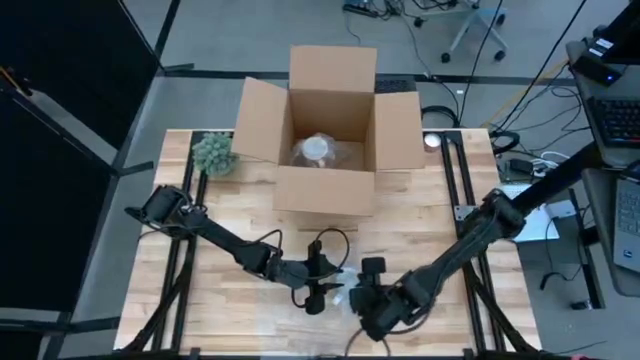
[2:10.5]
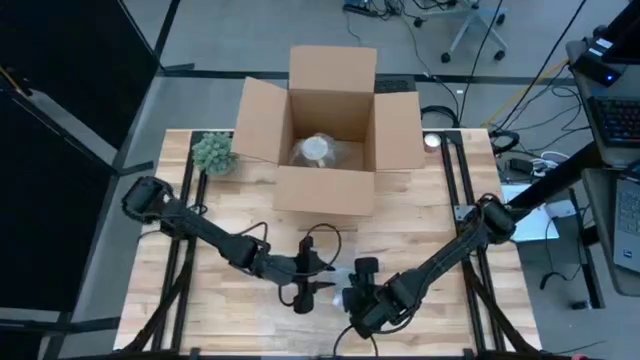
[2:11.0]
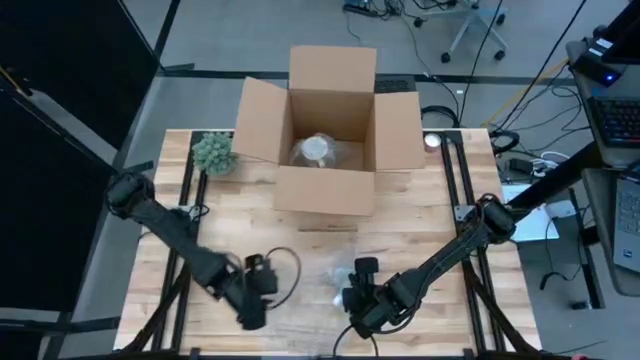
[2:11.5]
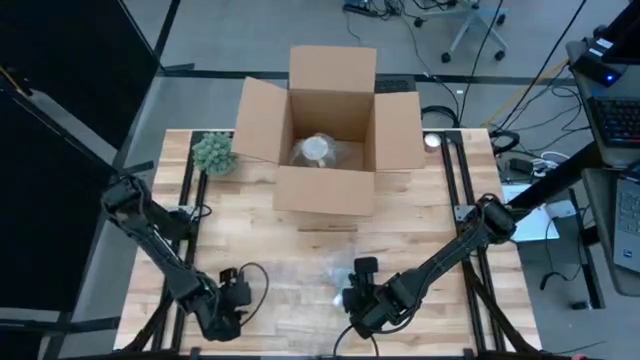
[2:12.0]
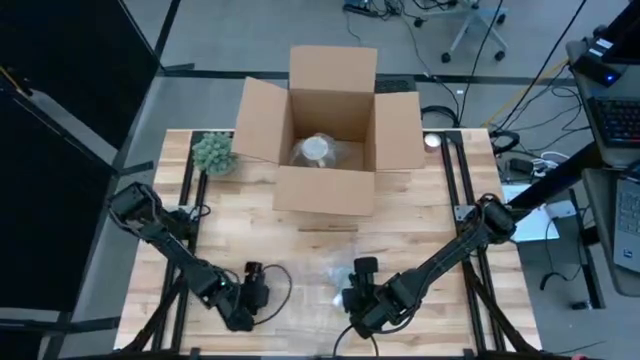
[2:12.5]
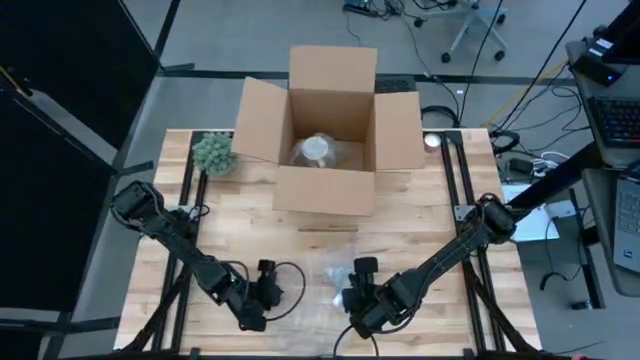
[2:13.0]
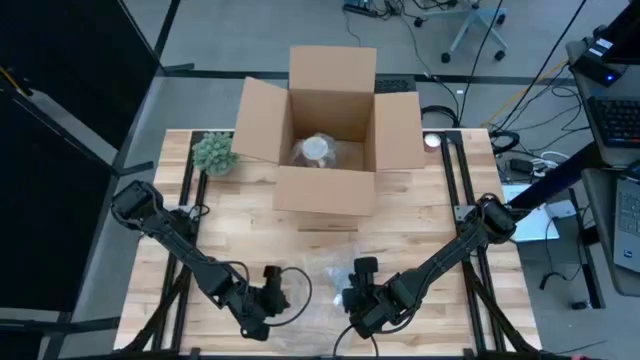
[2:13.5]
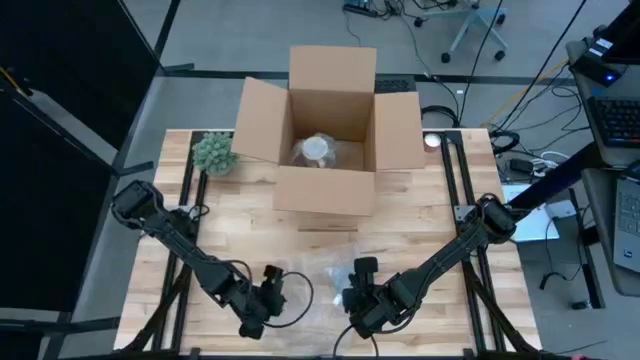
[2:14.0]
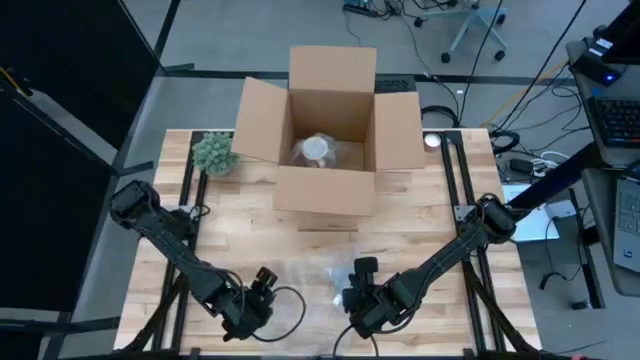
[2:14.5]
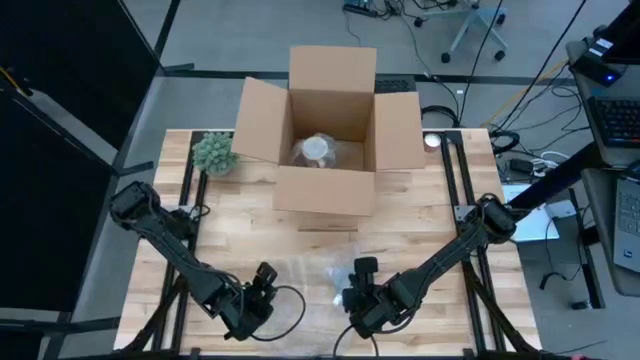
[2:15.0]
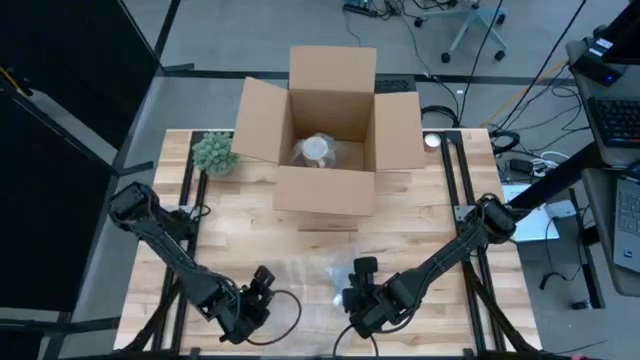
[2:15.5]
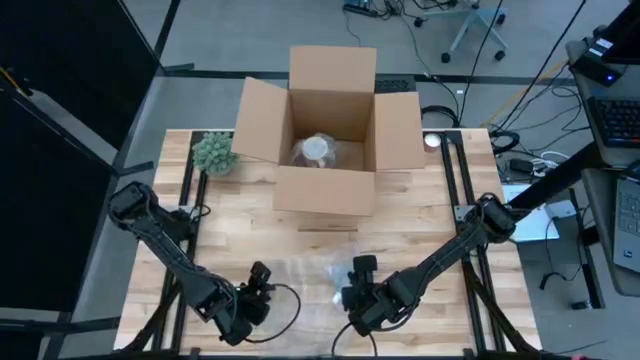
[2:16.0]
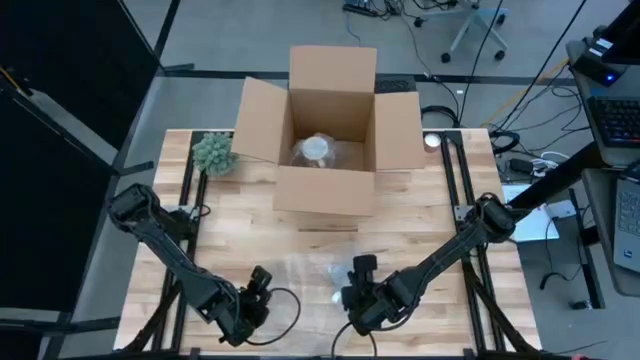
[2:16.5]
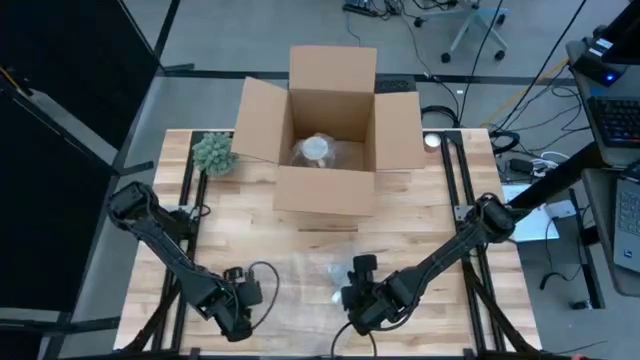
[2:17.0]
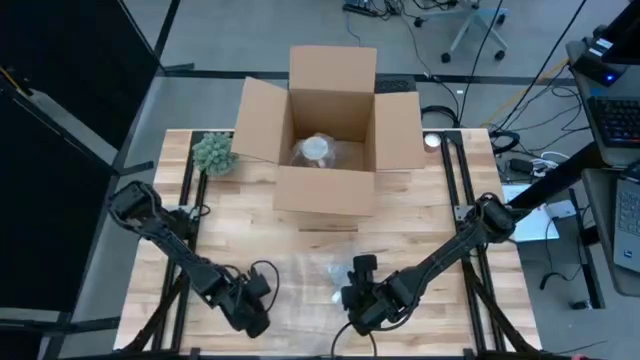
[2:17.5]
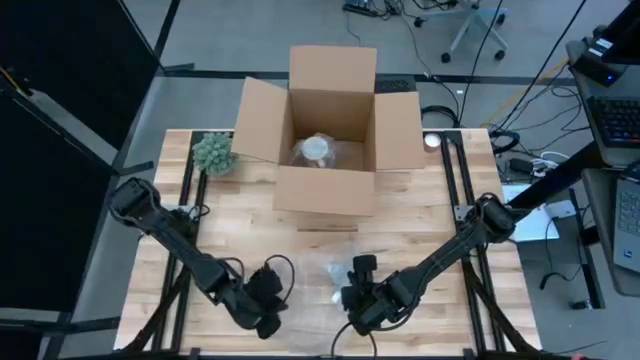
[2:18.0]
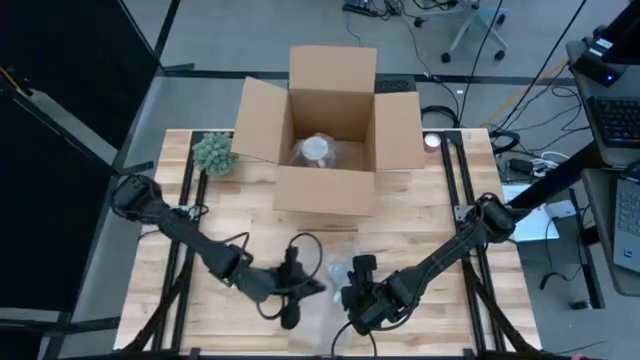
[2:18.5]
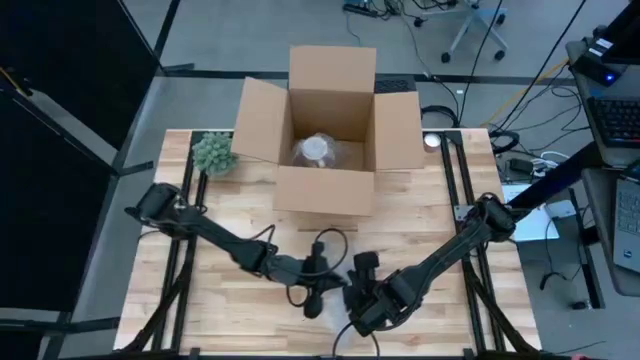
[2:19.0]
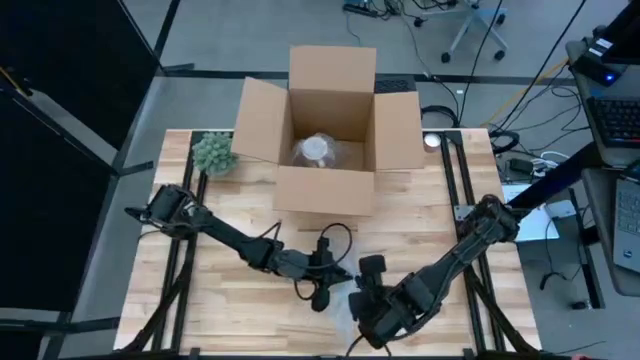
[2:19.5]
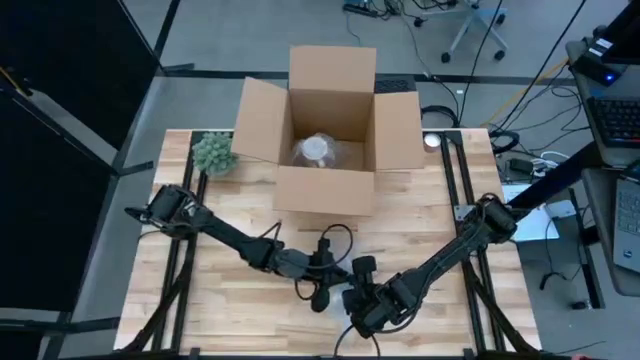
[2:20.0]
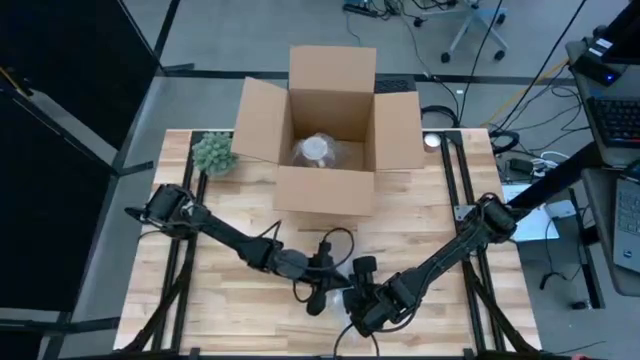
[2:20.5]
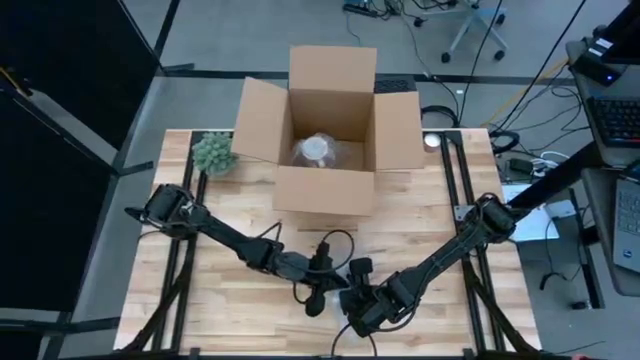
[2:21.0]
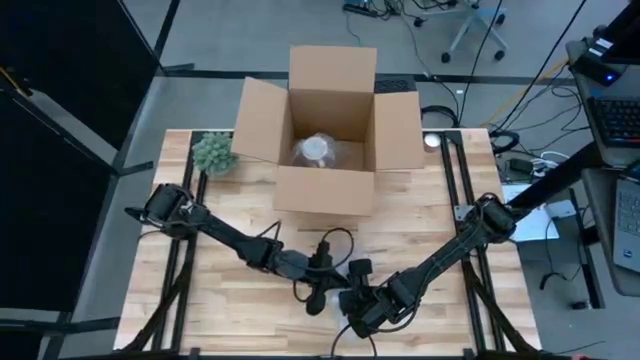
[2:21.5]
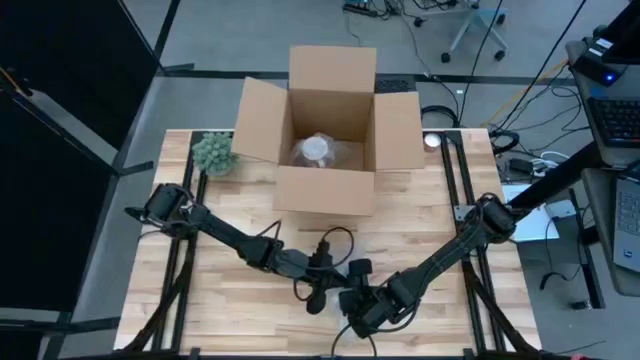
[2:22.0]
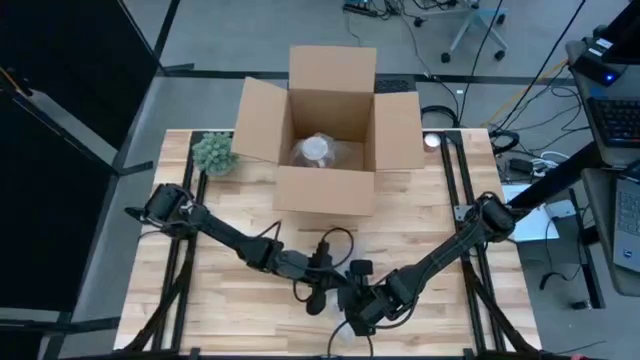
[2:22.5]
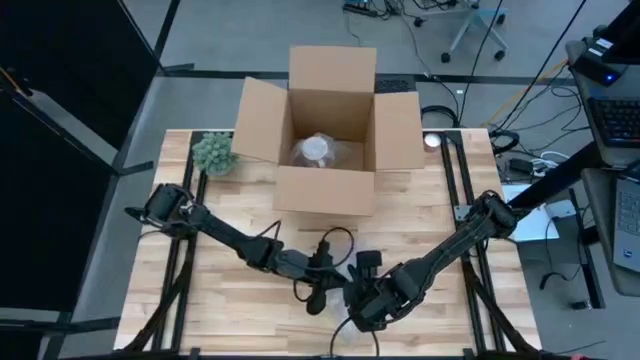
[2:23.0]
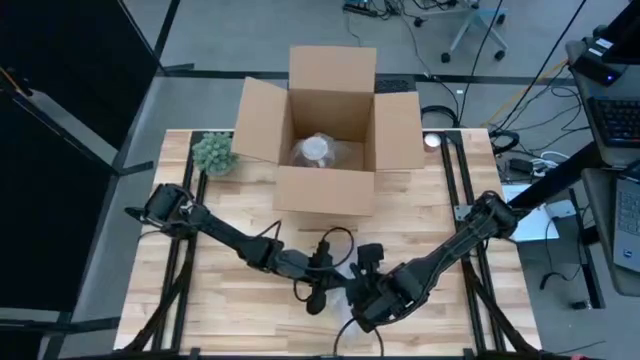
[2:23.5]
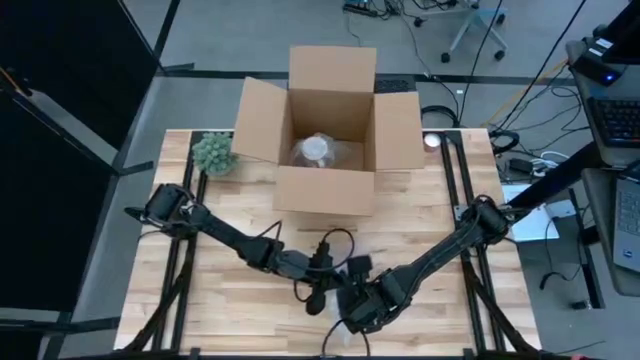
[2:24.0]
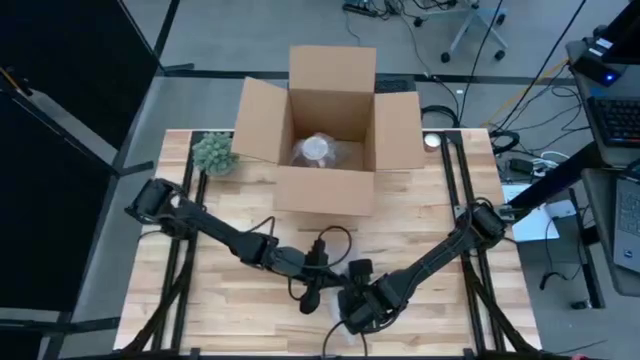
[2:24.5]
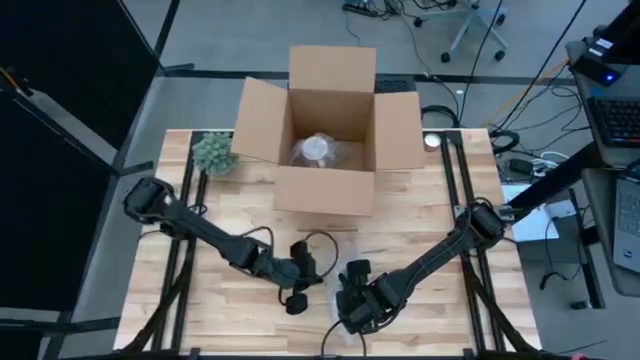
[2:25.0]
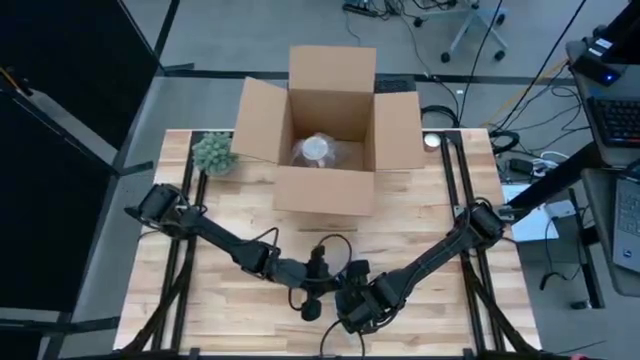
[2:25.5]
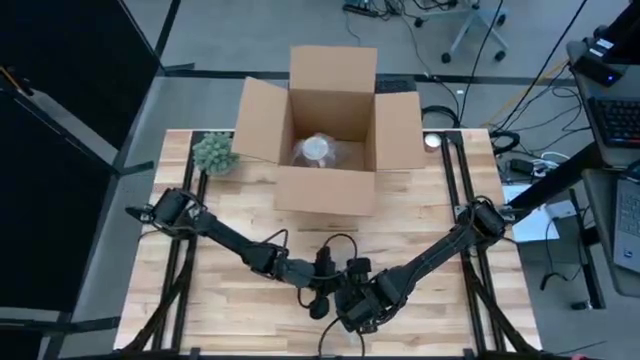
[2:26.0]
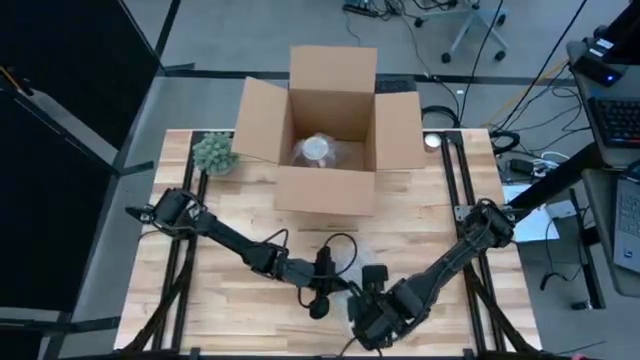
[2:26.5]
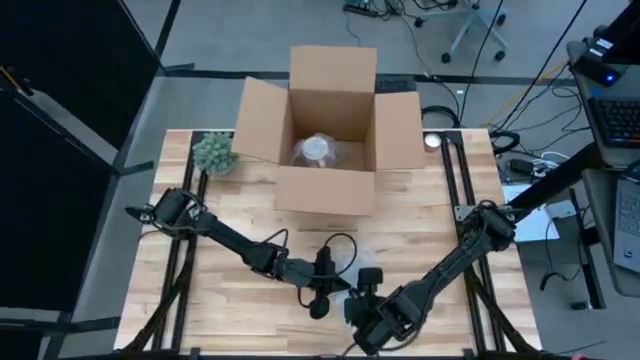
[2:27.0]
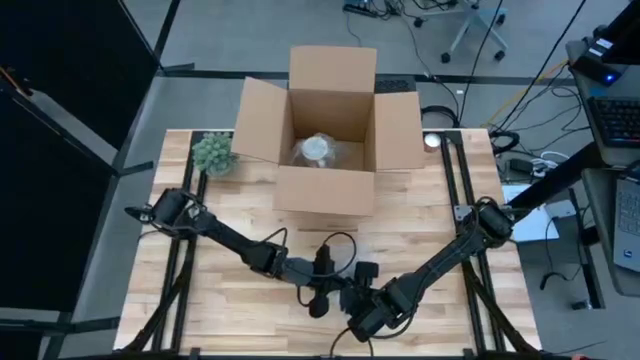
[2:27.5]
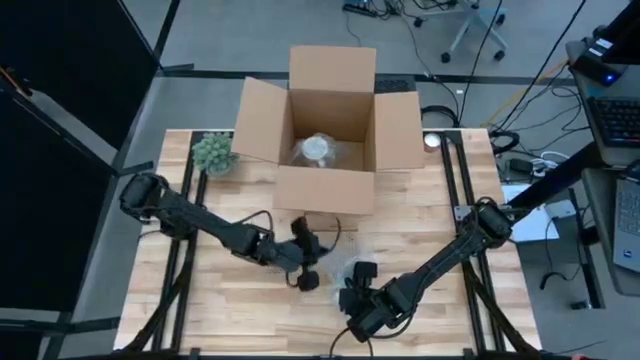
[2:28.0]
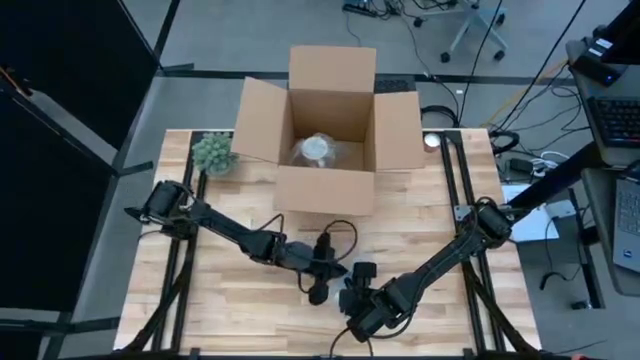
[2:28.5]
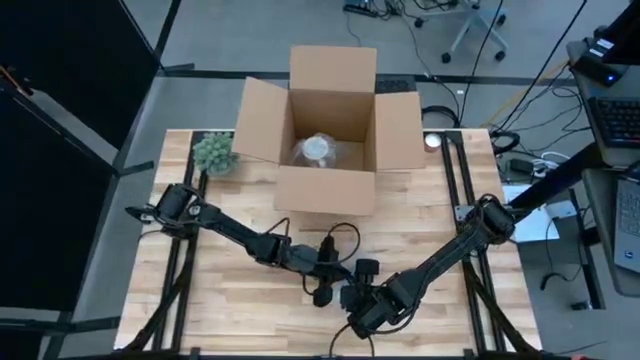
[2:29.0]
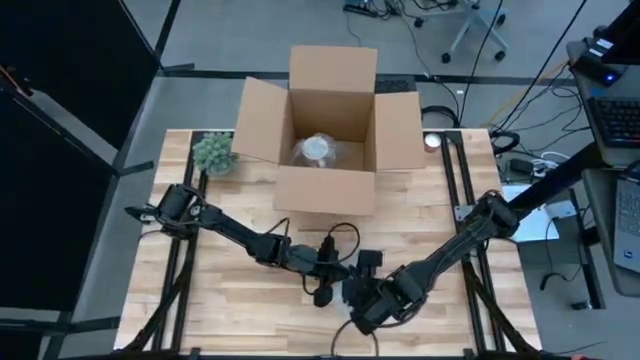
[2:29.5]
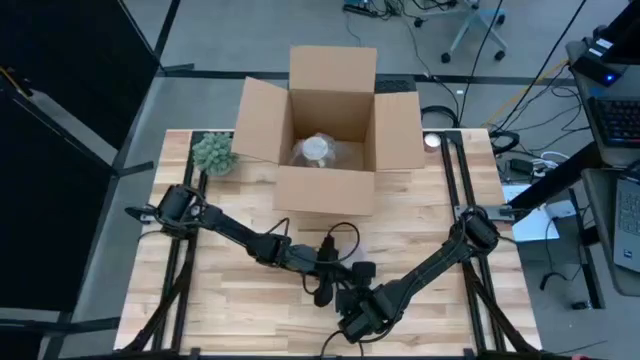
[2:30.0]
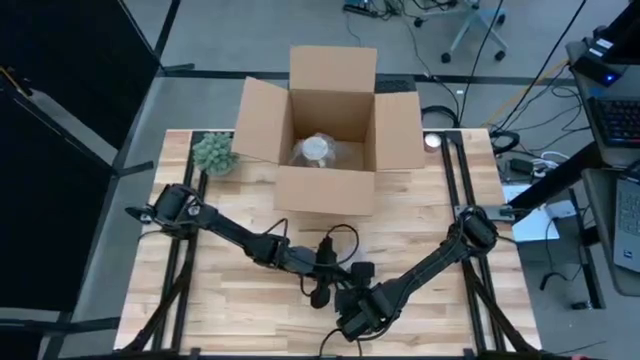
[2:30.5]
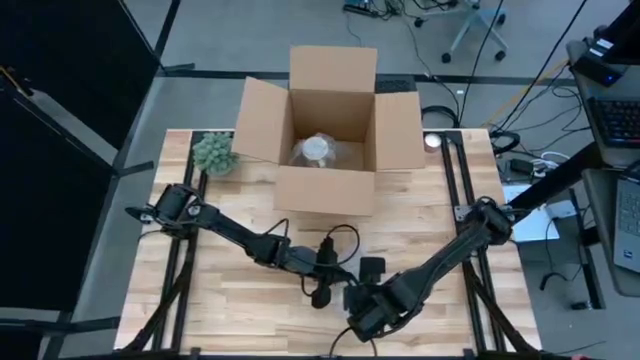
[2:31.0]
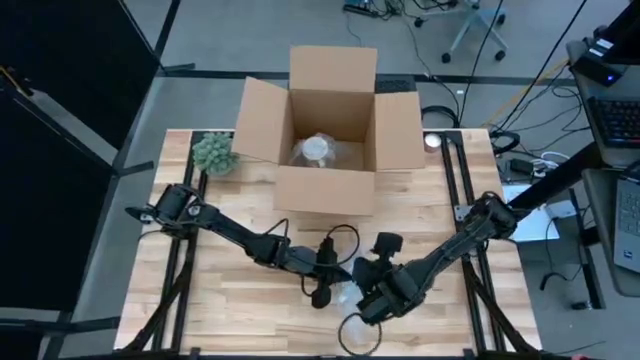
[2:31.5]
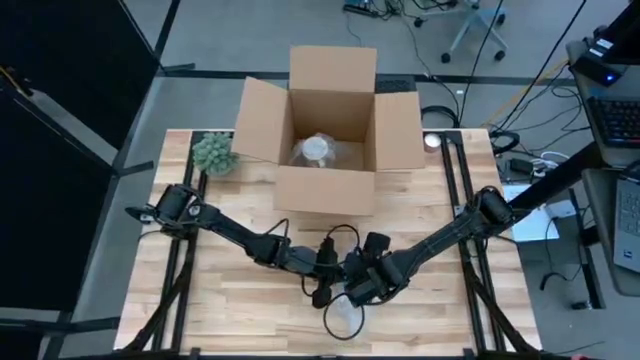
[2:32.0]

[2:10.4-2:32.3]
Task: wrap mug
Wrap the red mug with bubble wrap
